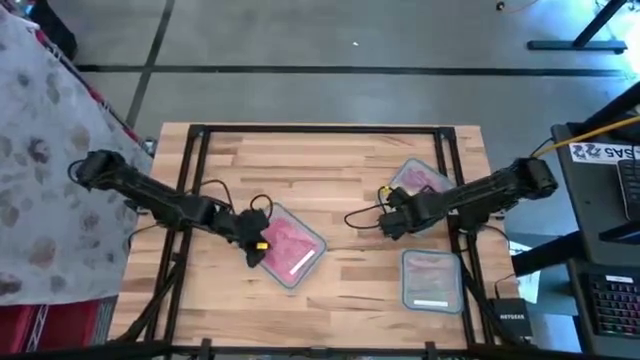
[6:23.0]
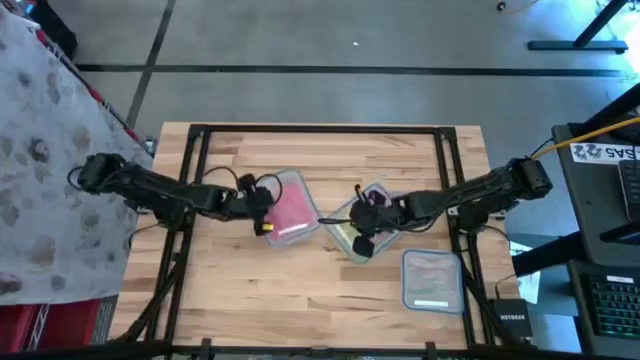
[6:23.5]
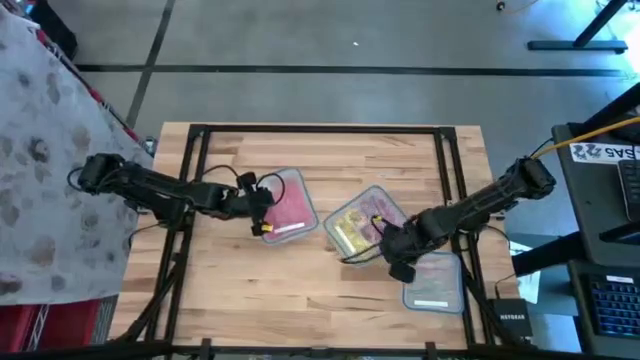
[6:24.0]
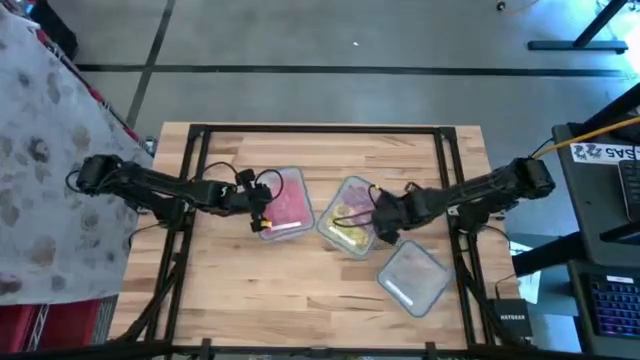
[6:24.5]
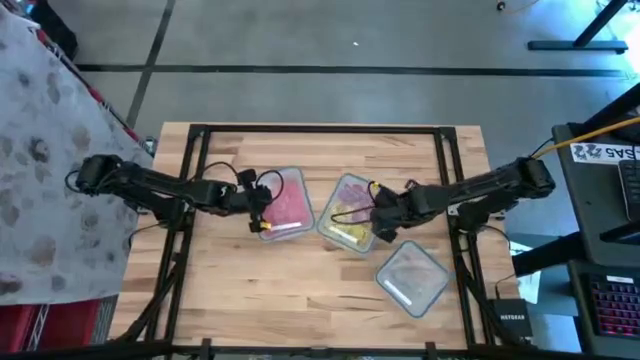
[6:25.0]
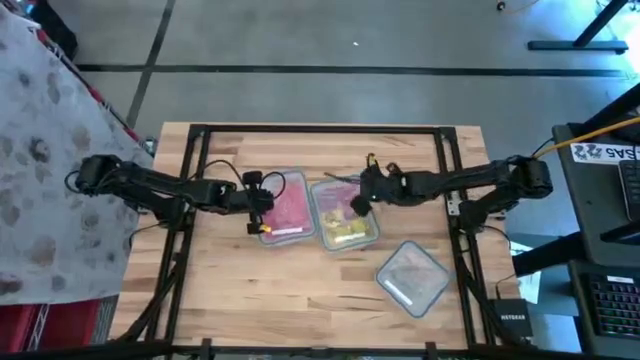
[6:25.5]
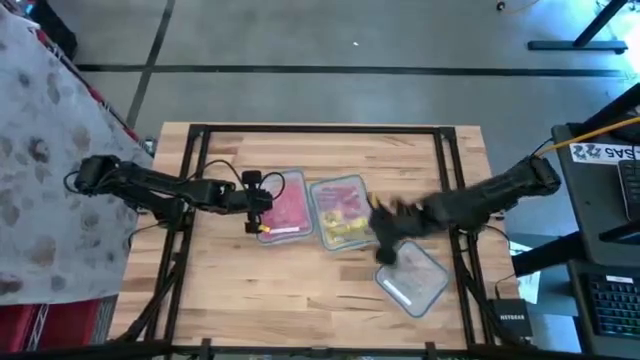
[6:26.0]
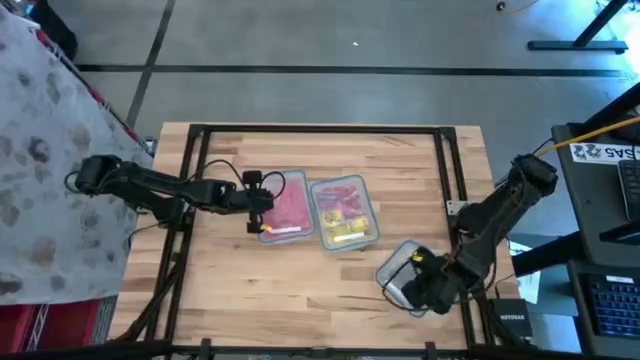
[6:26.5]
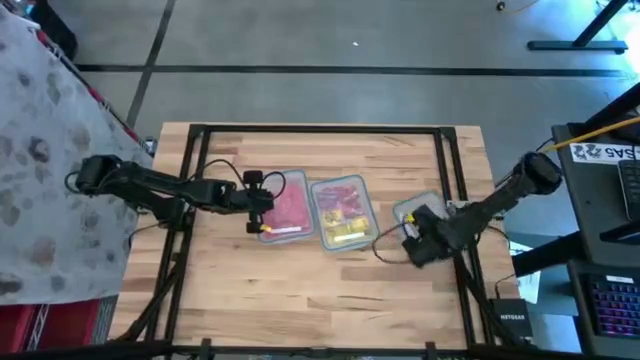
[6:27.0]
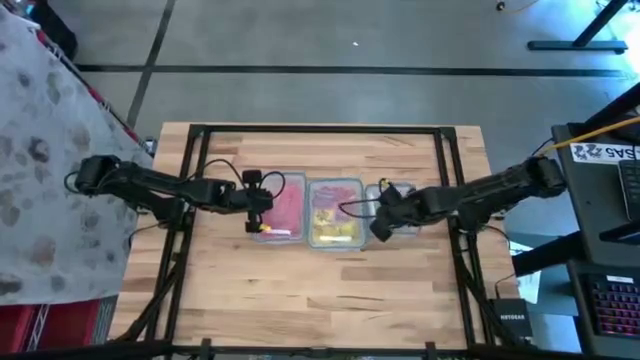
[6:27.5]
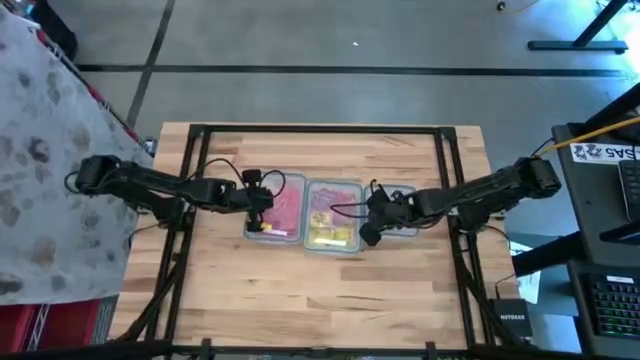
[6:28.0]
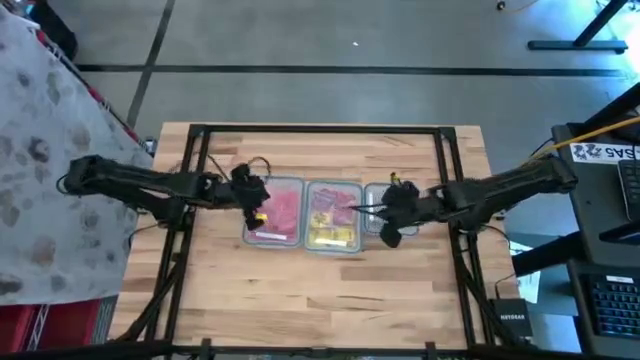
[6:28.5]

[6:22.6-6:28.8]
Task: Sort candy
Adjust all the transparent bins closer together

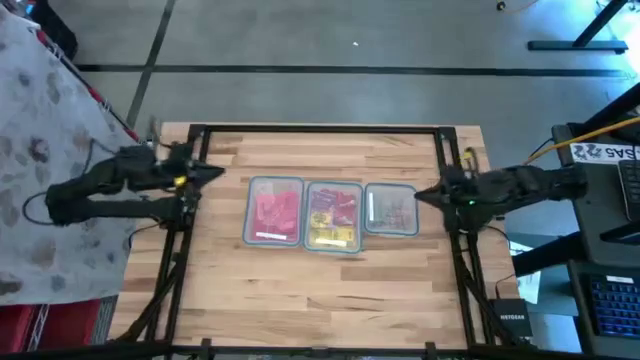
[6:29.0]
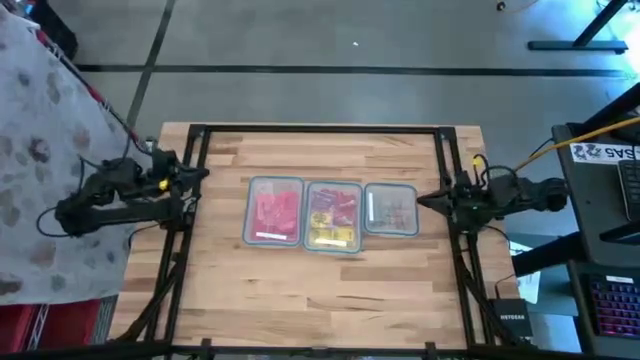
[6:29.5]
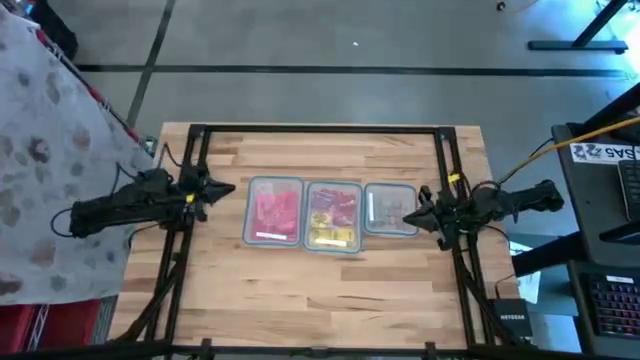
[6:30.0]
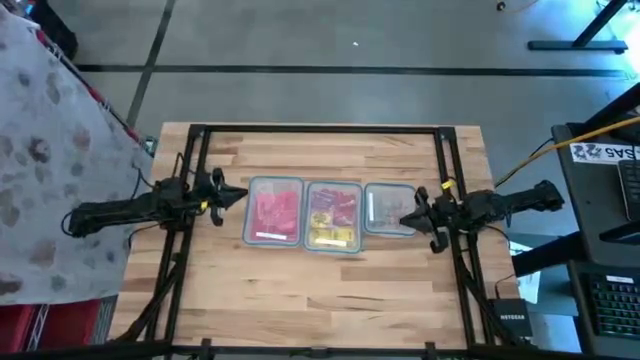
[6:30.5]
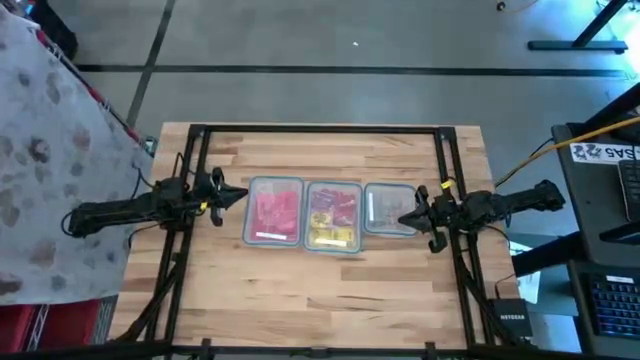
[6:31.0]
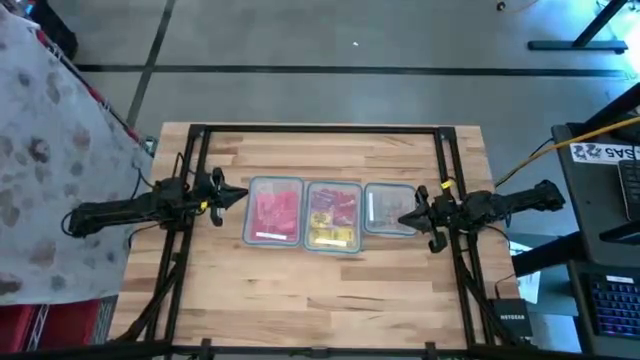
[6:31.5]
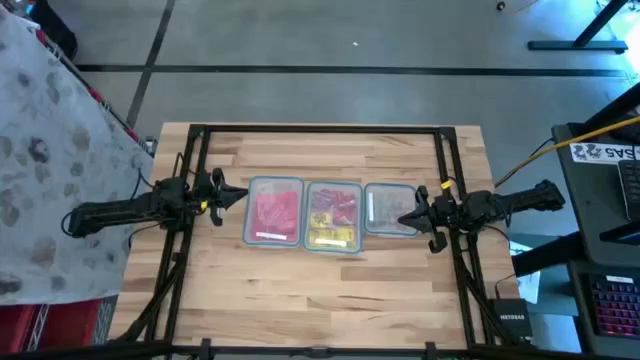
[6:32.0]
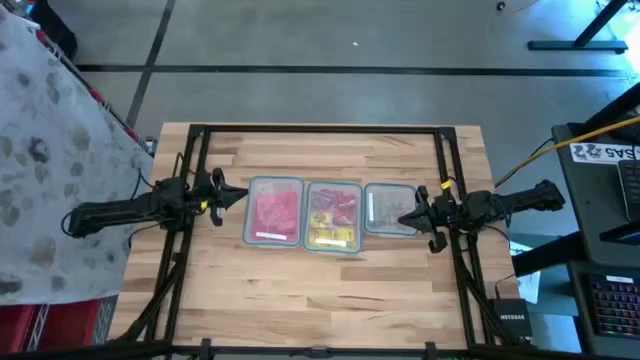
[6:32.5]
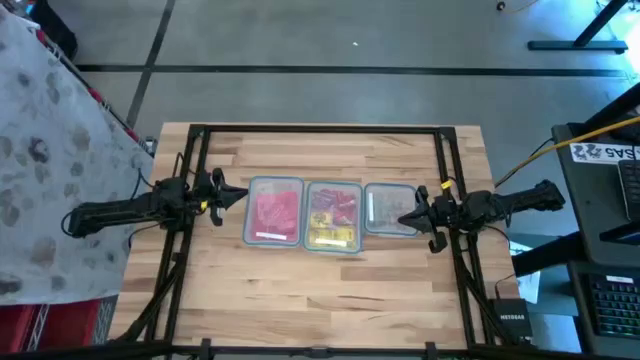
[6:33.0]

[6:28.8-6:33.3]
Return to home position

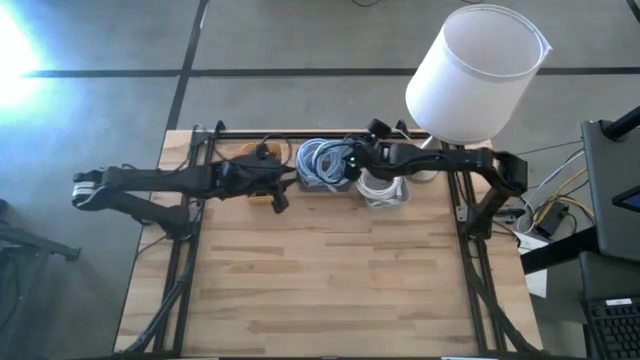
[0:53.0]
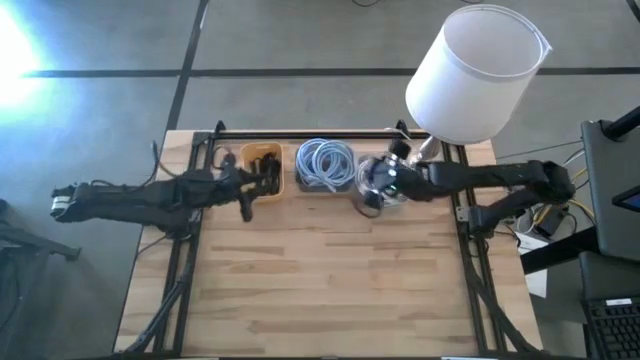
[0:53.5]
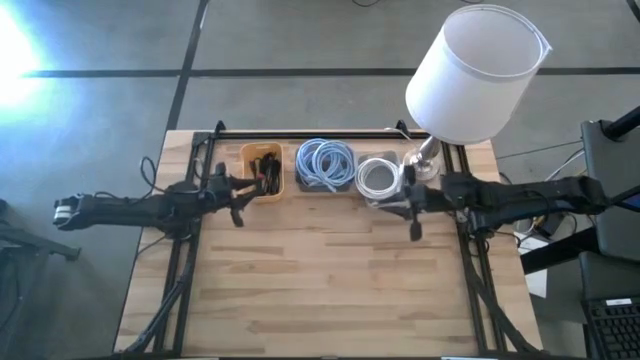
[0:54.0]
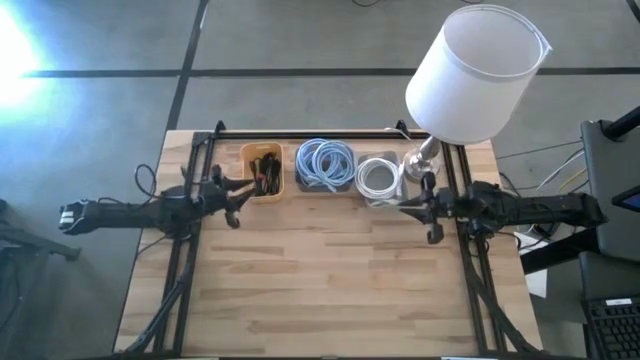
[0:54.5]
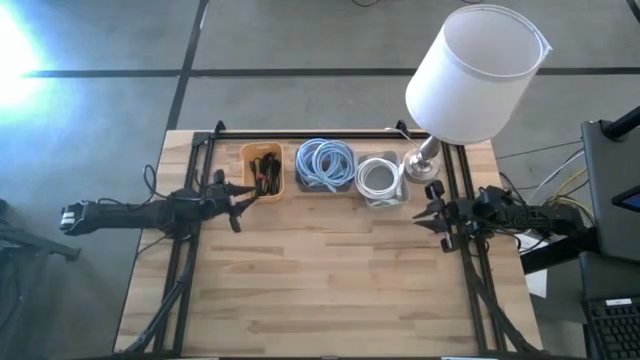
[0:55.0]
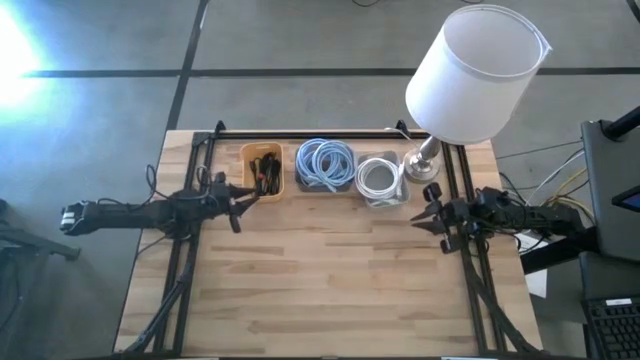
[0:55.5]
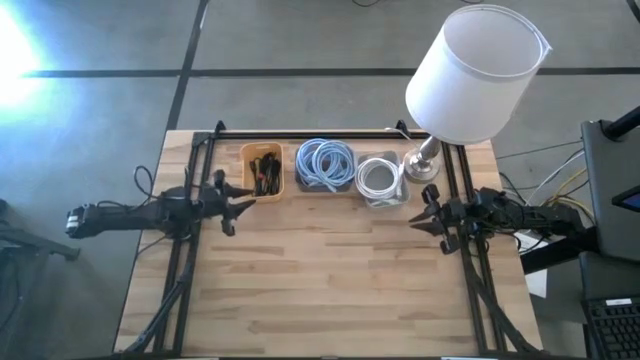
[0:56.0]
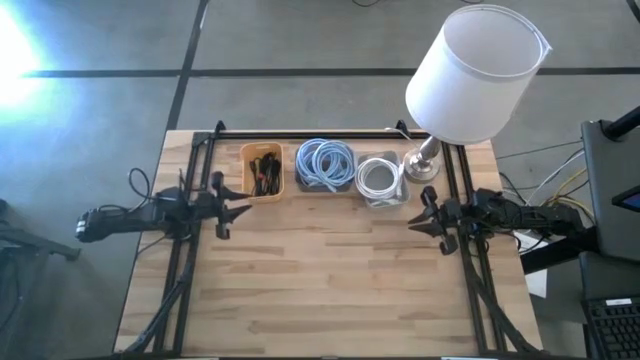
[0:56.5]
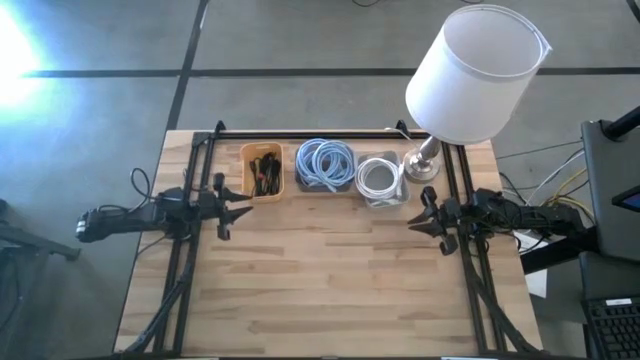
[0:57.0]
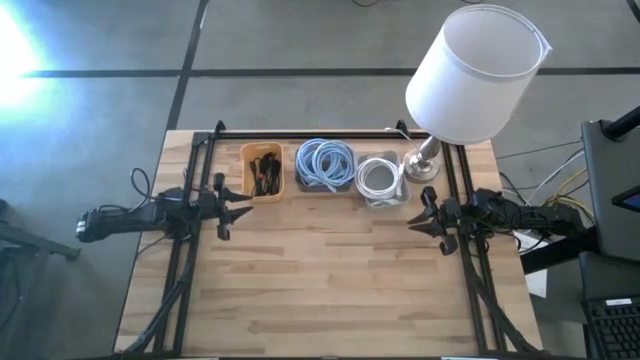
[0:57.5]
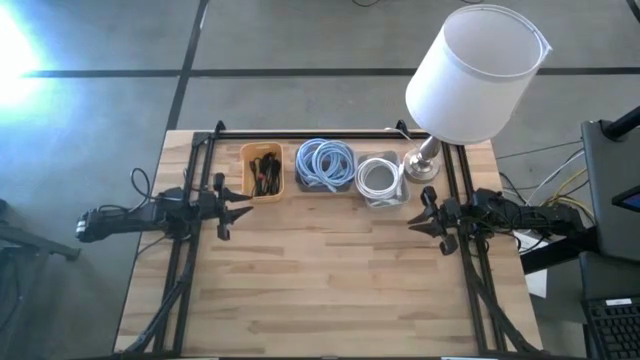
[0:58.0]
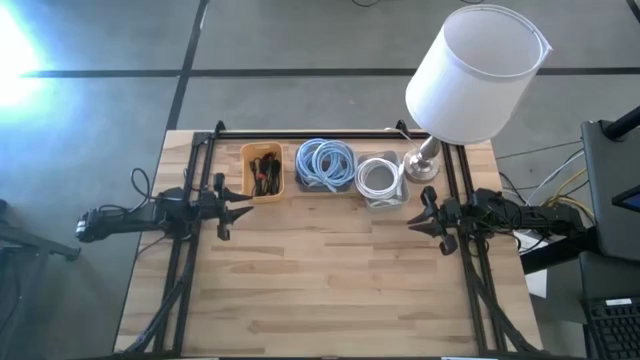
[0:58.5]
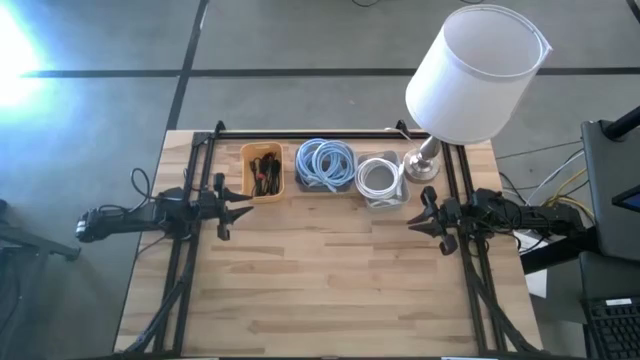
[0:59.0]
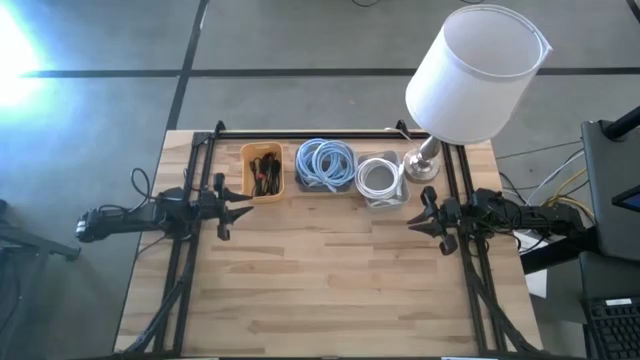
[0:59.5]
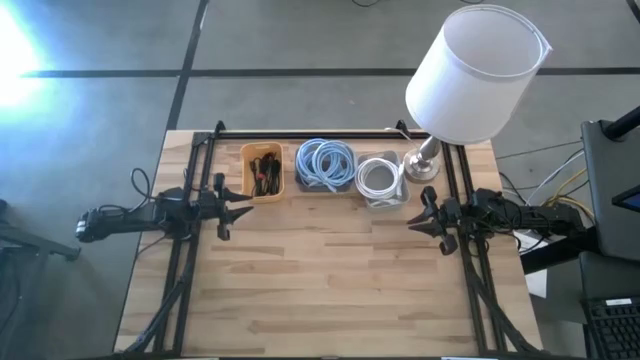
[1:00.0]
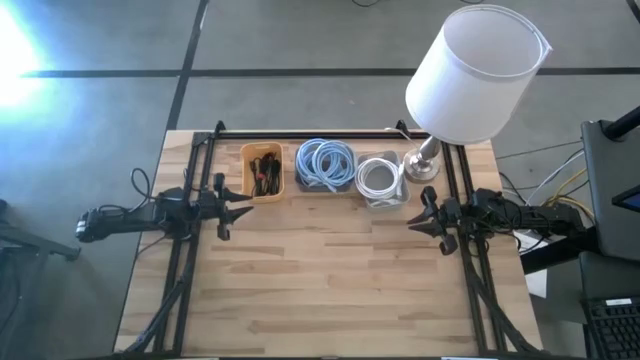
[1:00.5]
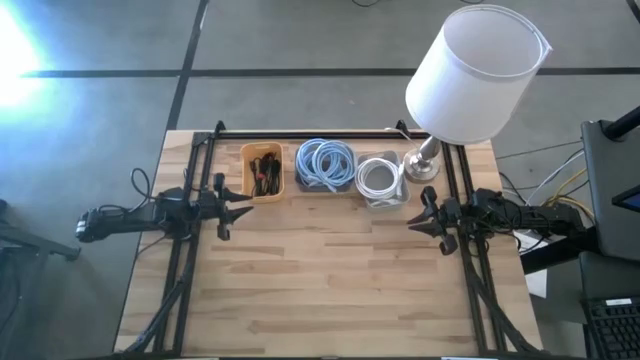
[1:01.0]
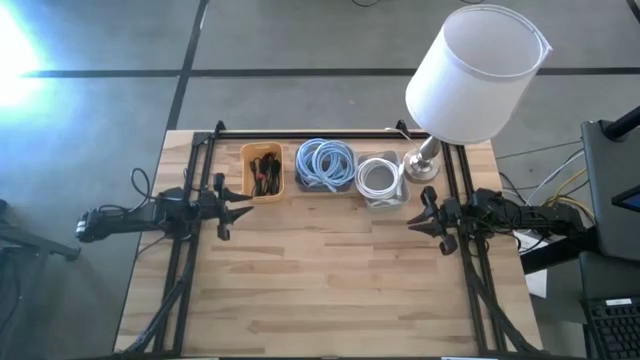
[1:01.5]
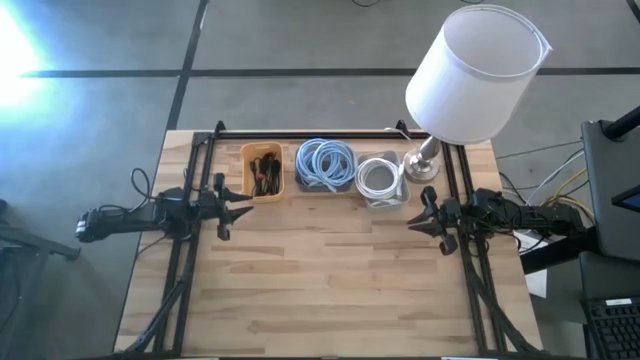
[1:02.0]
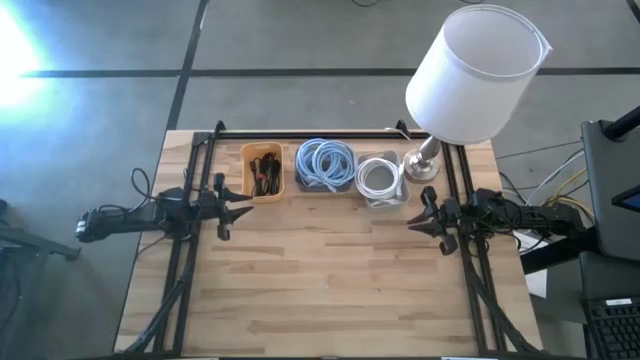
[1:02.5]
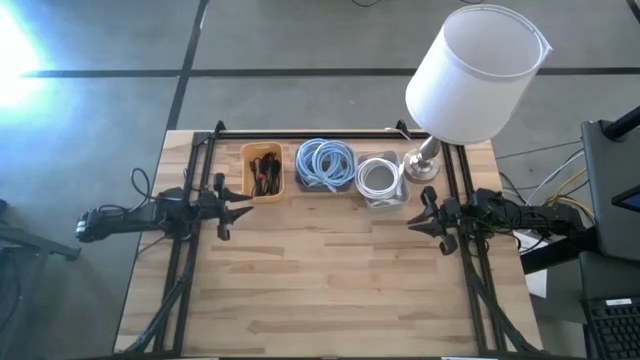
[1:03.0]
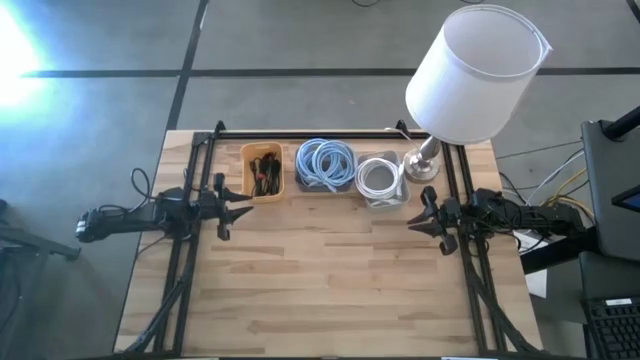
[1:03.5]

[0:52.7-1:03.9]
Task: Pick & Place USB Port
Return to Home Position
